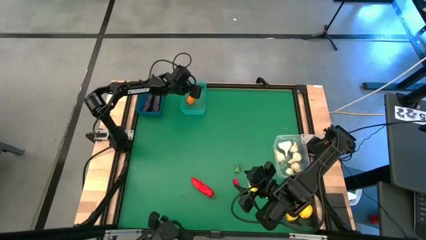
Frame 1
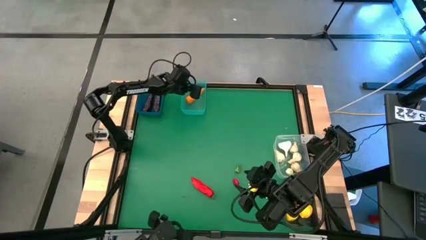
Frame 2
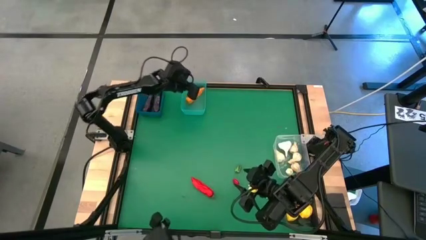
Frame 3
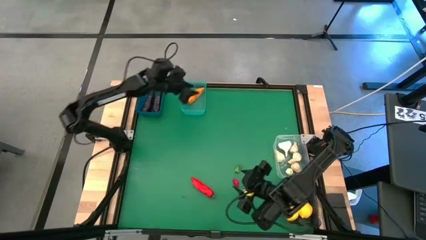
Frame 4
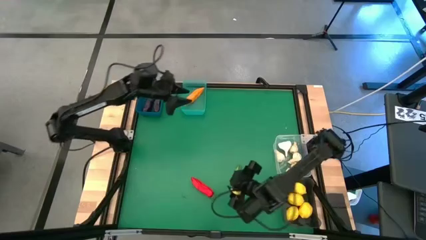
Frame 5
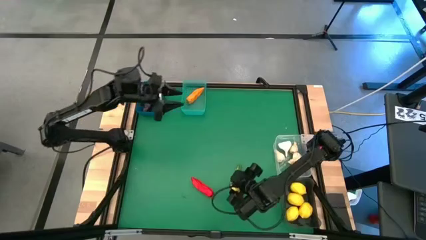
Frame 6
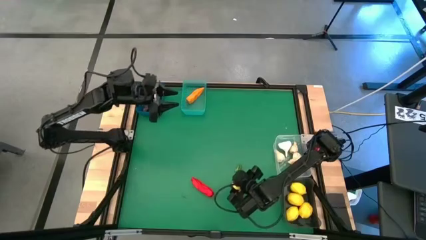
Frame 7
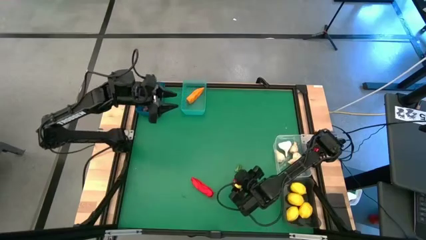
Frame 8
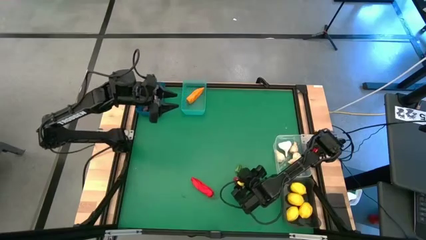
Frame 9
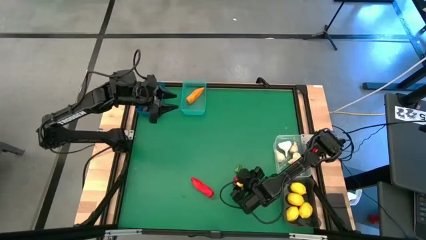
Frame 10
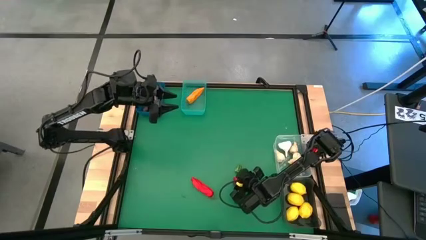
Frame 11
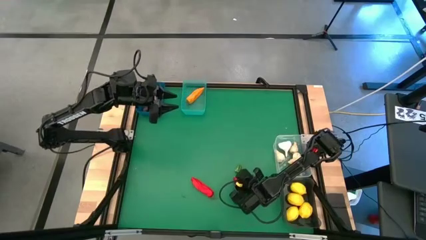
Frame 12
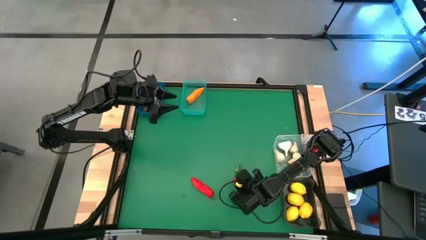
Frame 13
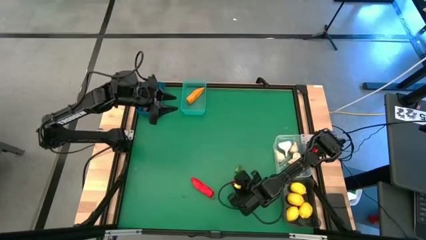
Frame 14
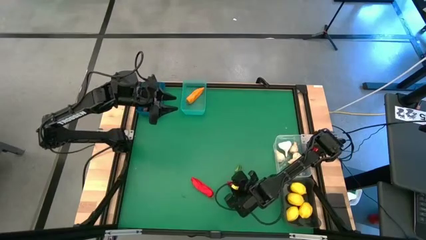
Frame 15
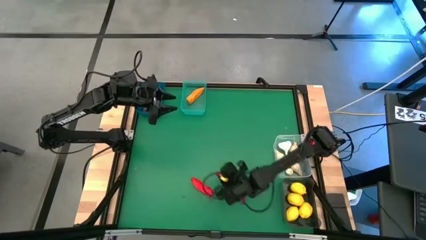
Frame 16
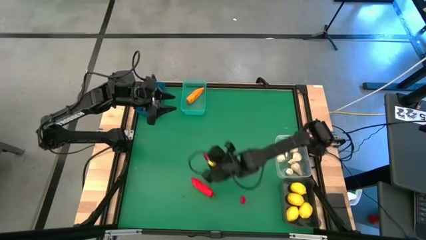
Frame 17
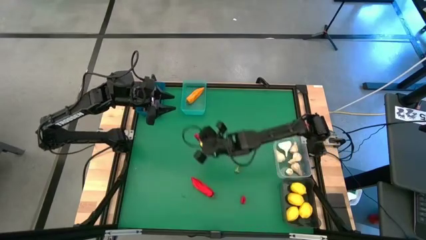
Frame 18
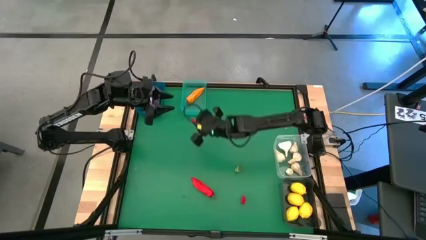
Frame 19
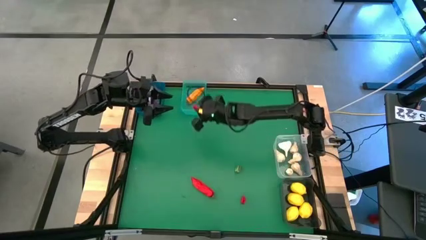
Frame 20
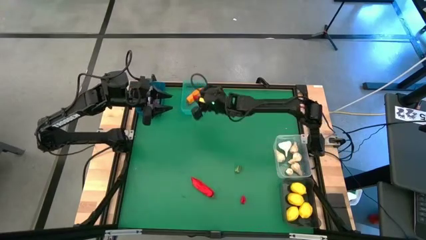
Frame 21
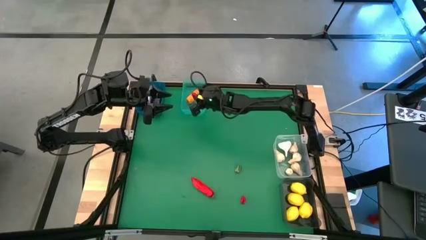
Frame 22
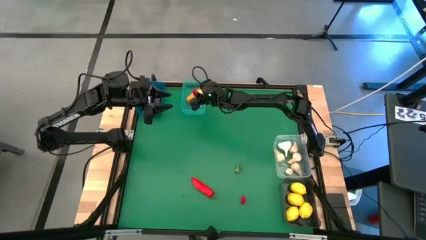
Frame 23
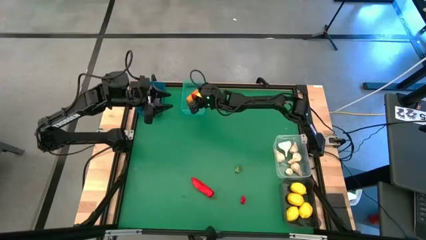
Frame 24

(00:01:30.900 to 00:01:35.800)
Task: Sort produce into baskets
Put the red chili pepper into the green bin

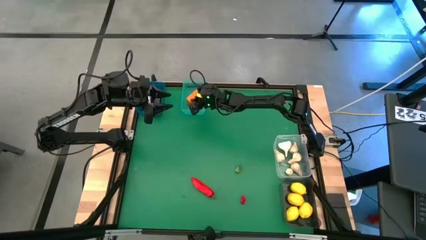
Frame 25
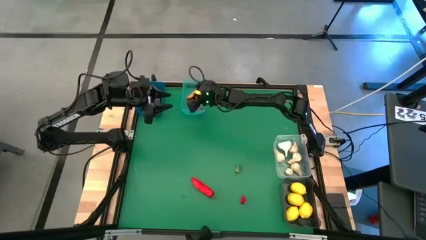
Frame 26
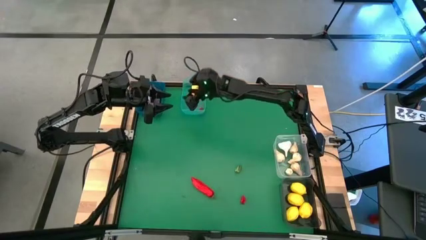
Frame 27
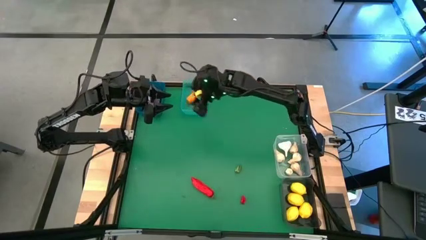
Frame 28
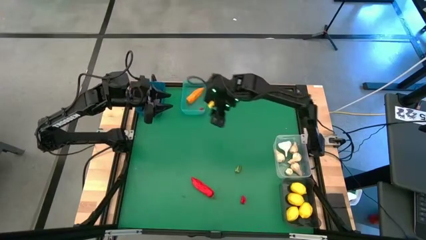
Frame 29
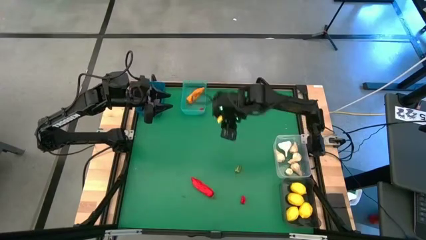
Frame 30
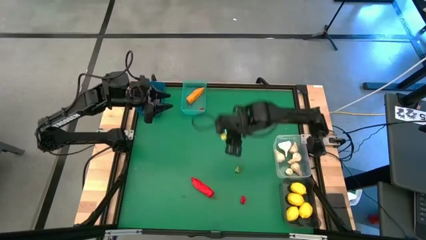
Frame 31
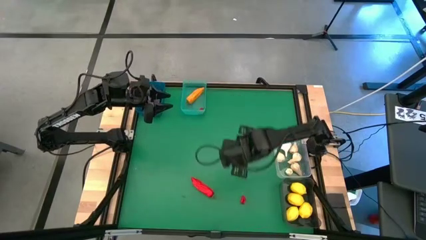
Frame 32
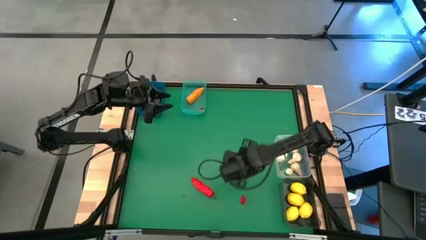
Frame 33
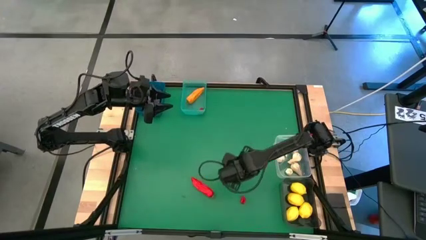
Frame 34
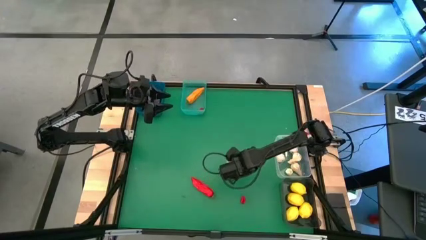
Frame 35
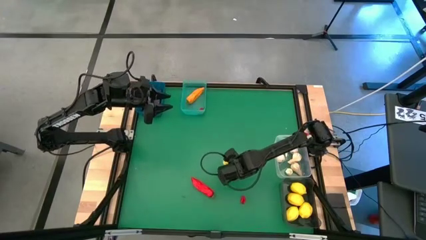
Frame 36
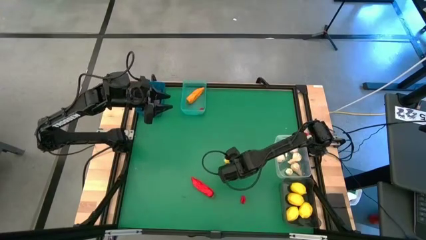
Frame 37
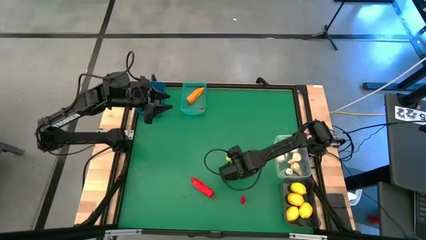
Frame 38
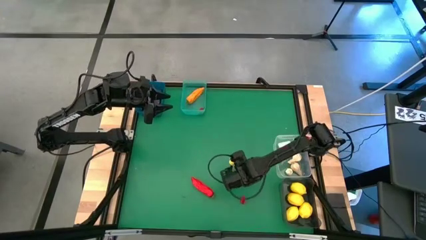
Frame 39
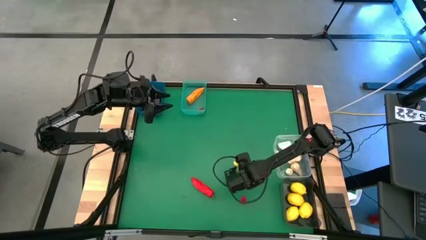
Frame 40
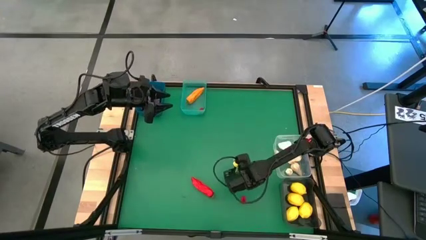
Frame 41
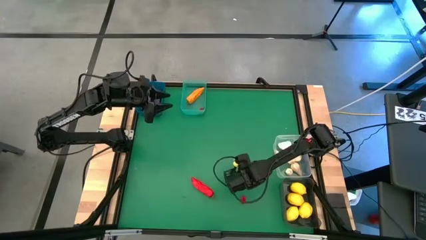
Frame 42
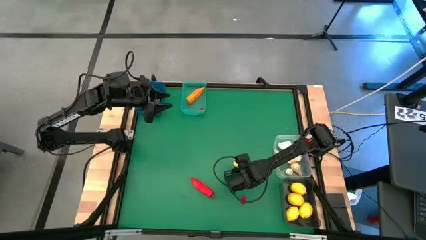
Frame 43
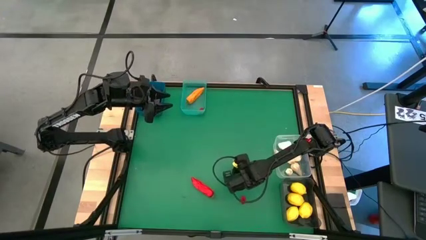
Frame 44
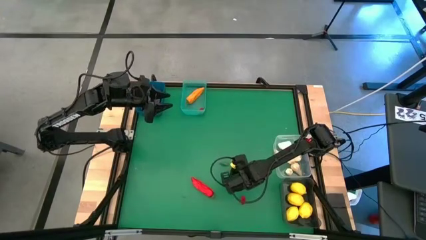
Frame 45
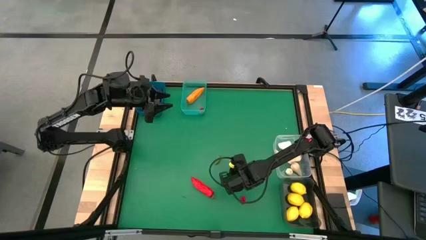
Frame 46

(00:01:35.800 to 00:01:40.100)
Put the green chili pepper into the green bin

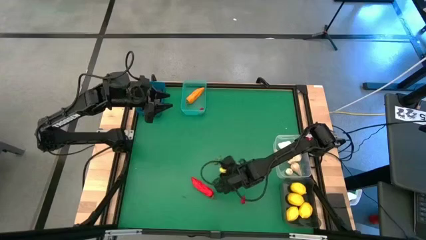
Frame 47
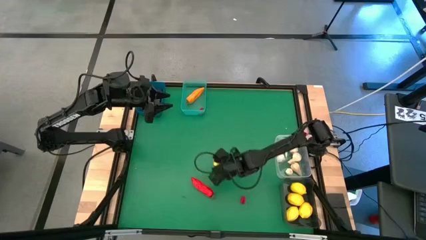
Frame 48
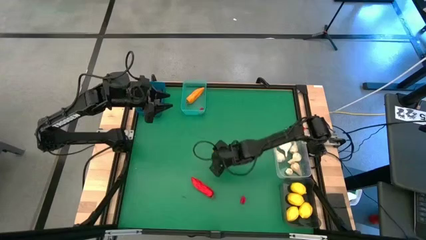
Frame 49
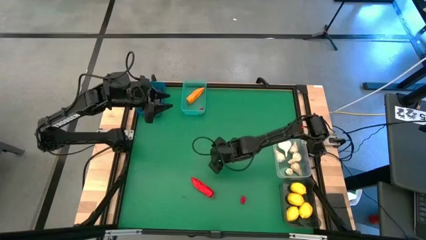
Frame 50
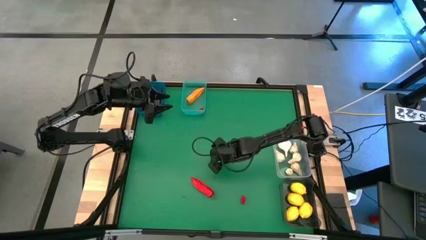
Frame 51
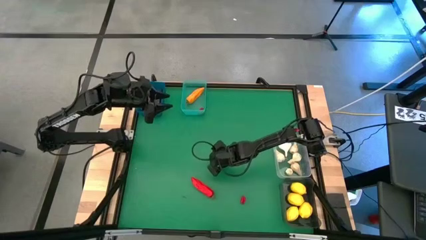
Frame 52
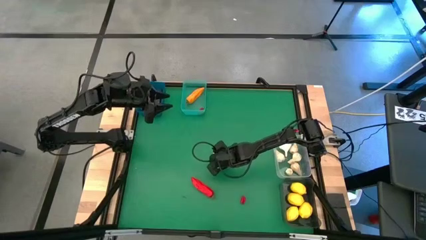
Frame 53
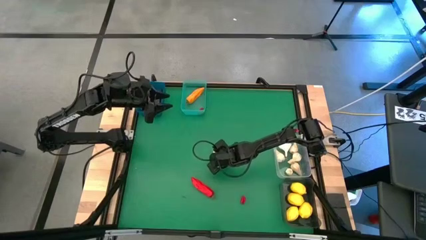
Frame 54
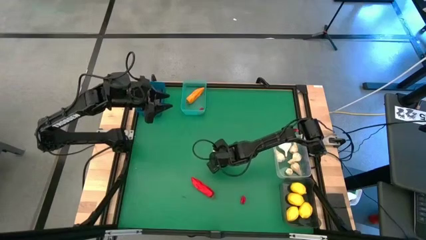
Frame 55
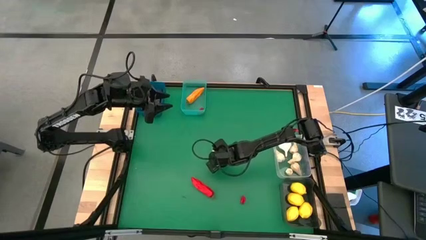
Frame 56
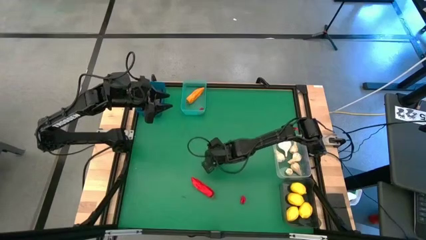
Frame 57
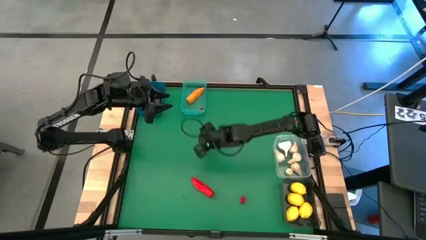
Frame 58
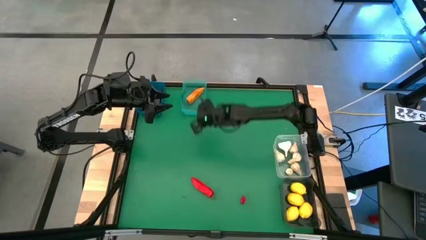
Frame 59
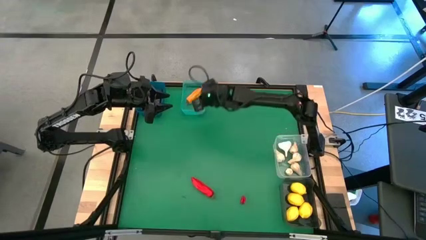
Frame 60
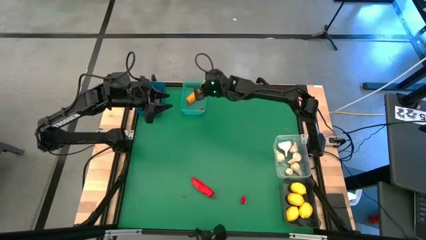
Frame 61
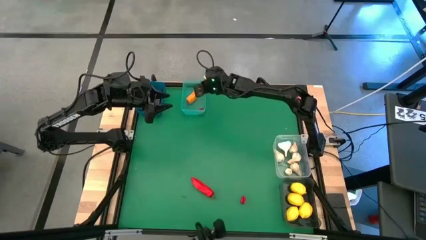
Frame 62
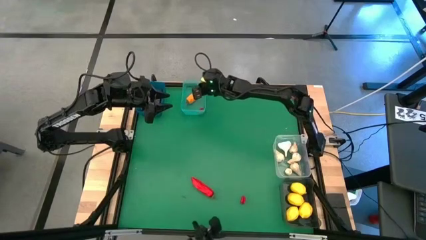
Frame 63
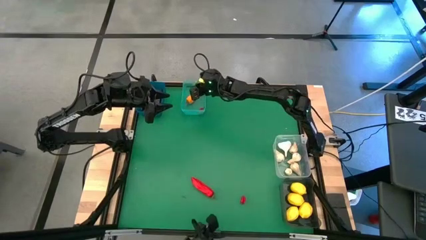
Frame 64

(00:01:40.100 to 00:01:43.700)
Put the green chili pepper into the green bin

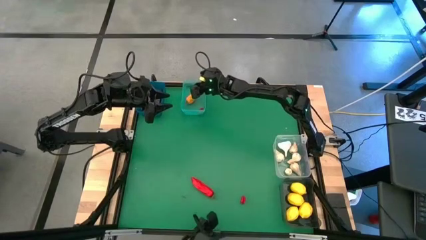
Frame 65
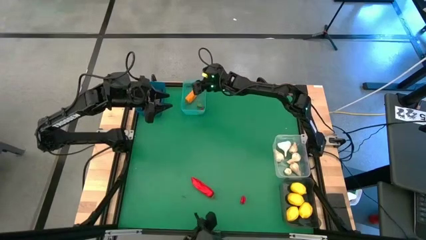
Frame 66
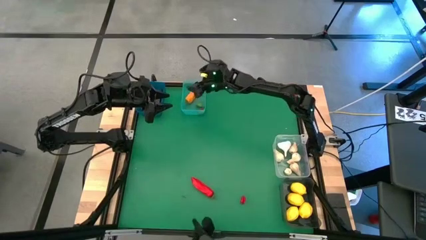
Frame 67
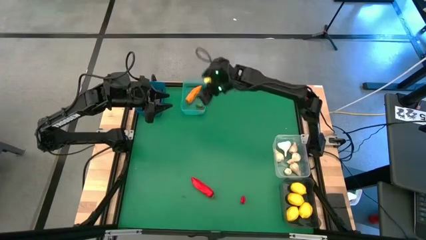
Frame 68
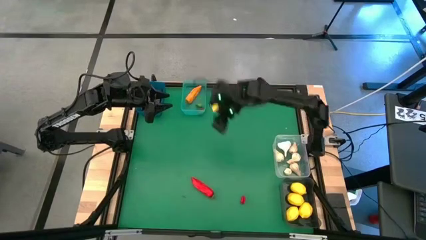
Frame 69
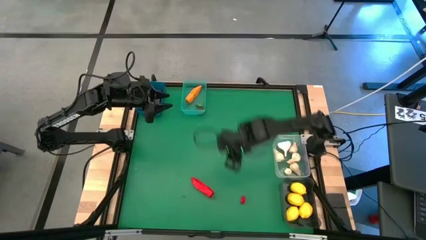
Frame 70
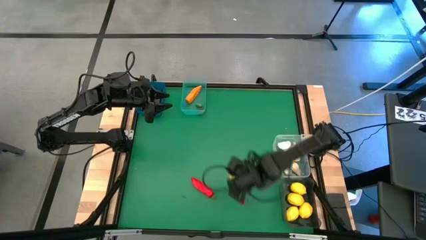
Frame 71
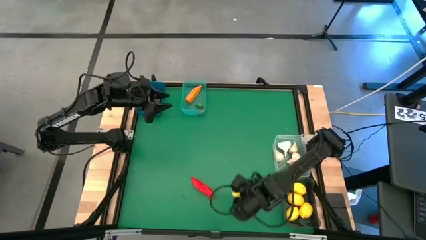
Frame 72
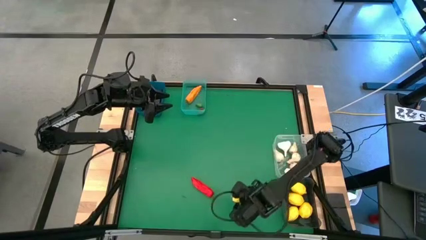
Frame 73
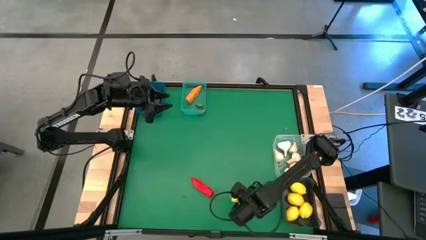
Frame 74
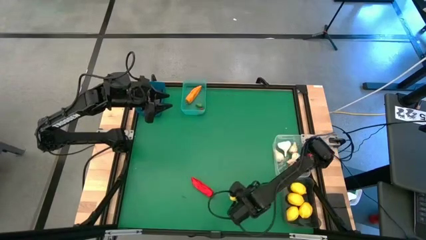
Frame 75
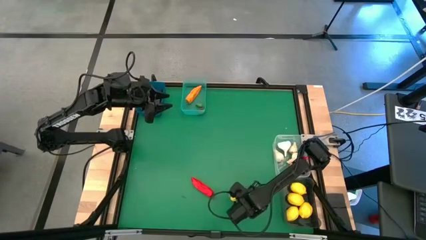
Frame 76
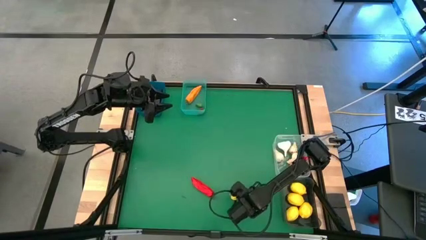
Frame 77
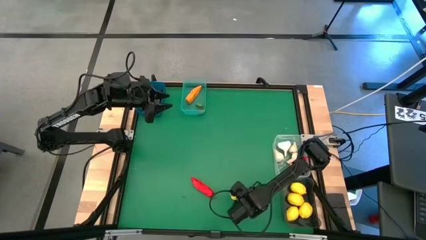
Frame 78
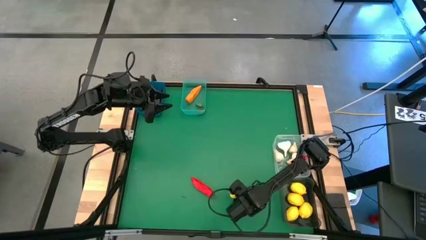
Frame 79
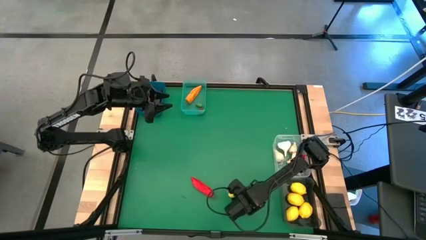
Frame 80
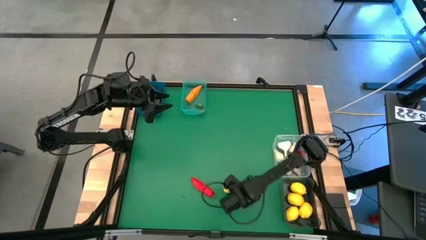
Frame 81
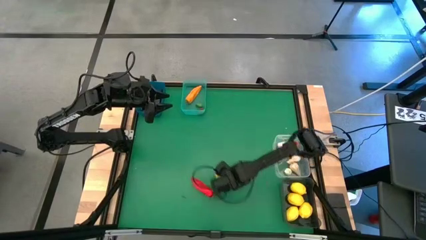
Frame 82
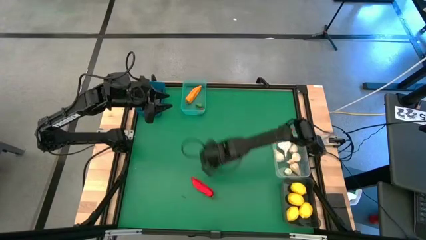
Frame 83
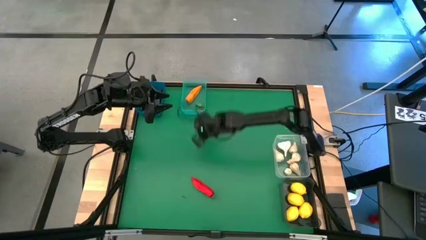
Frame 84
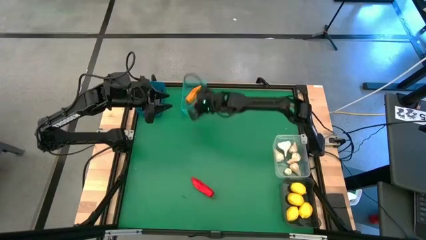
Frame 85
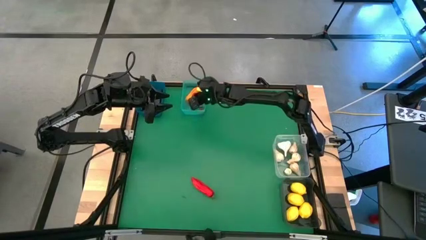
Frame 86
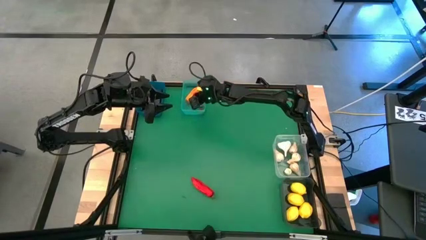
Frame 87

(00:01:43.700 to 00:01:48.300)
Put the red chili pepper into the green bin
